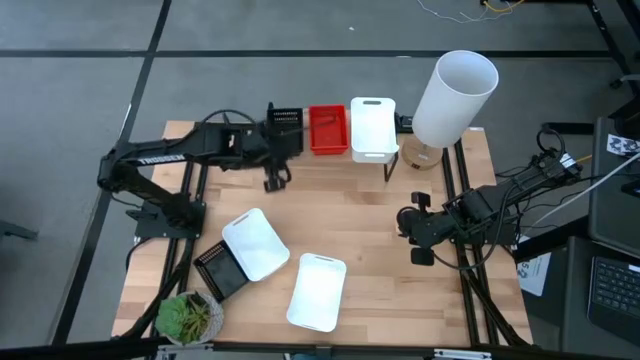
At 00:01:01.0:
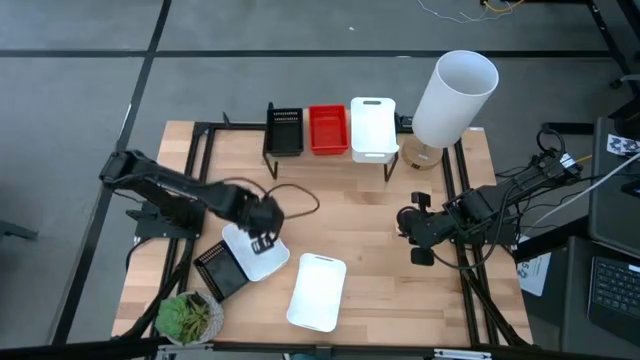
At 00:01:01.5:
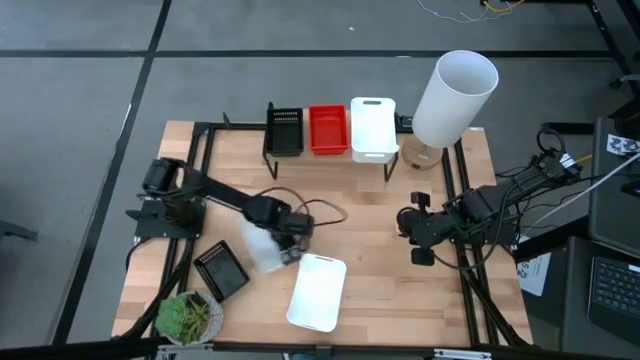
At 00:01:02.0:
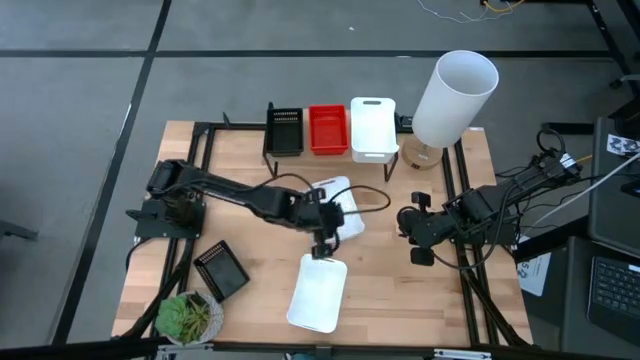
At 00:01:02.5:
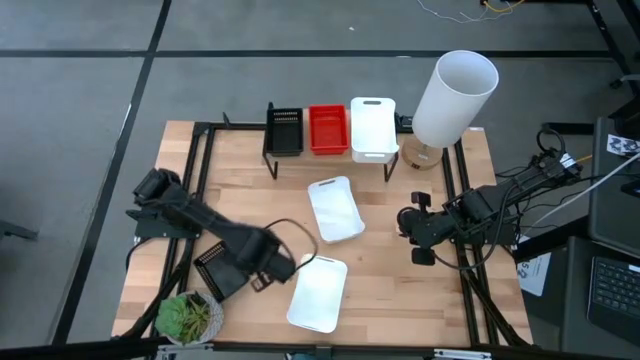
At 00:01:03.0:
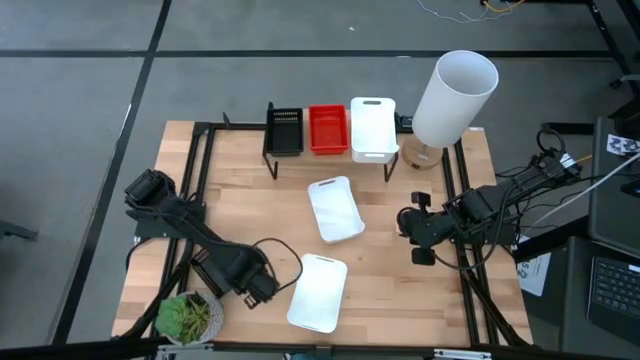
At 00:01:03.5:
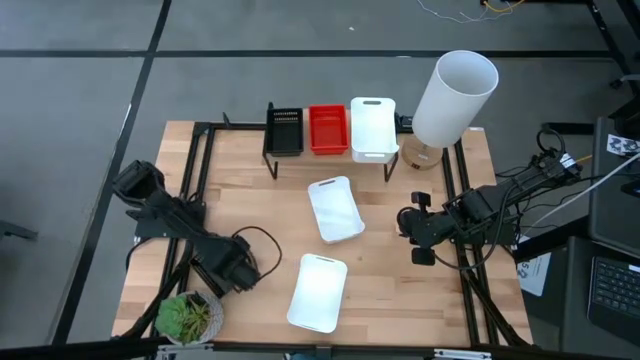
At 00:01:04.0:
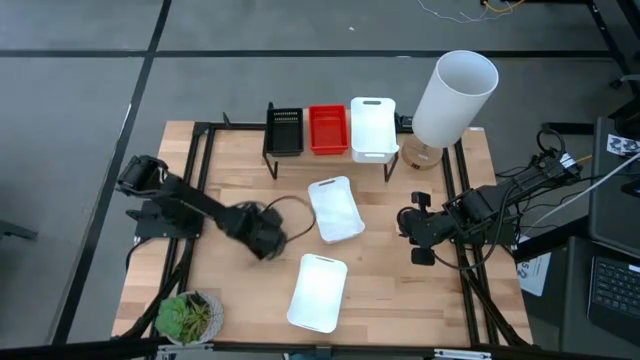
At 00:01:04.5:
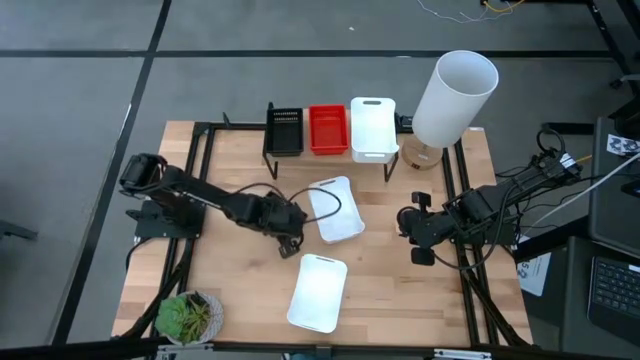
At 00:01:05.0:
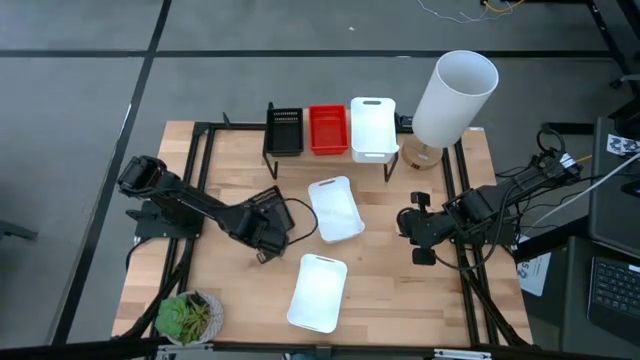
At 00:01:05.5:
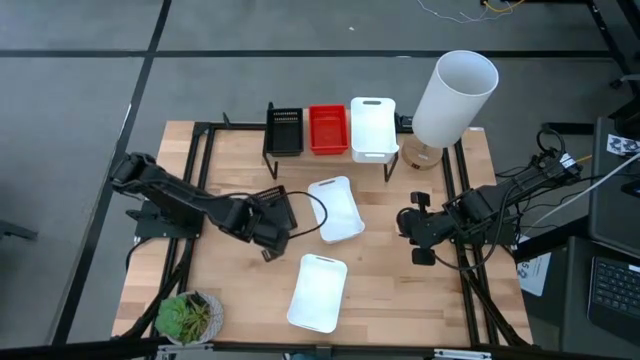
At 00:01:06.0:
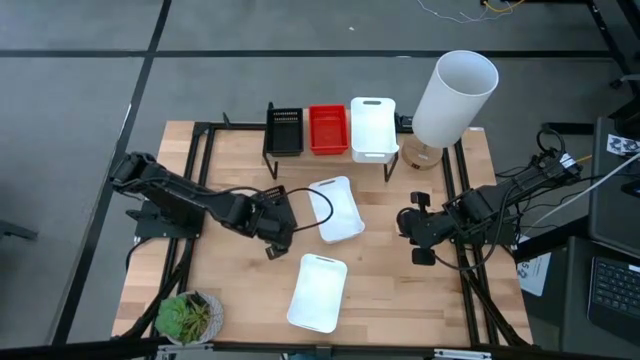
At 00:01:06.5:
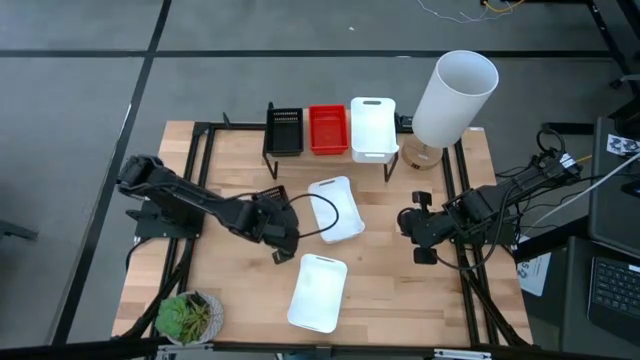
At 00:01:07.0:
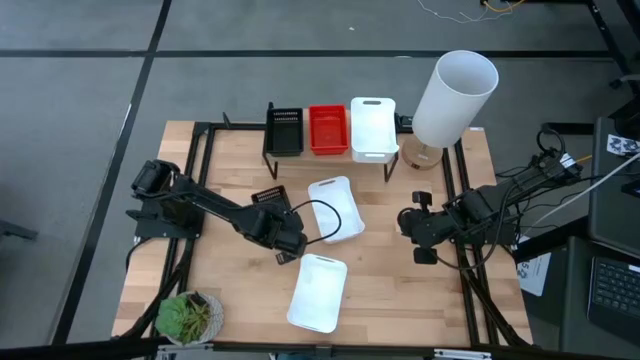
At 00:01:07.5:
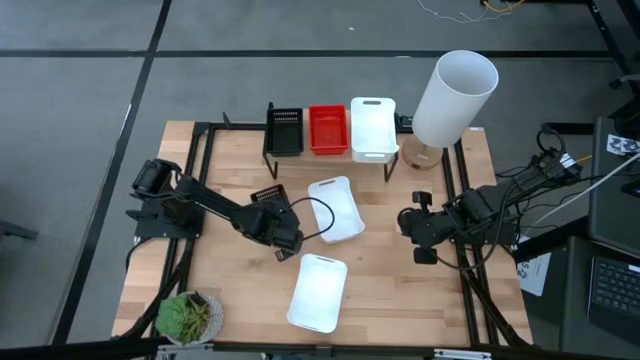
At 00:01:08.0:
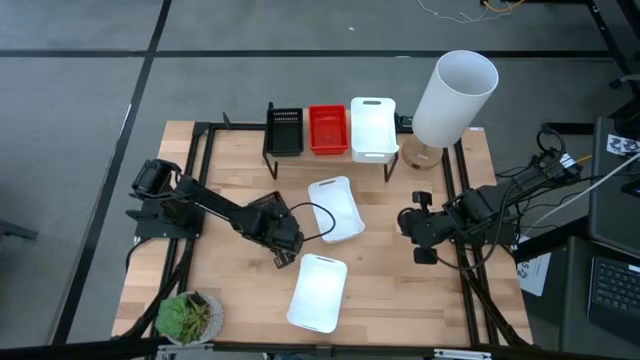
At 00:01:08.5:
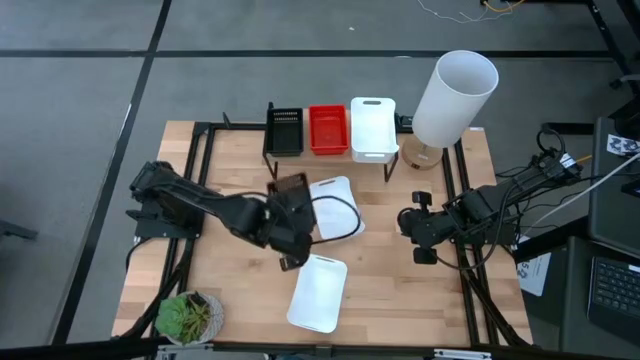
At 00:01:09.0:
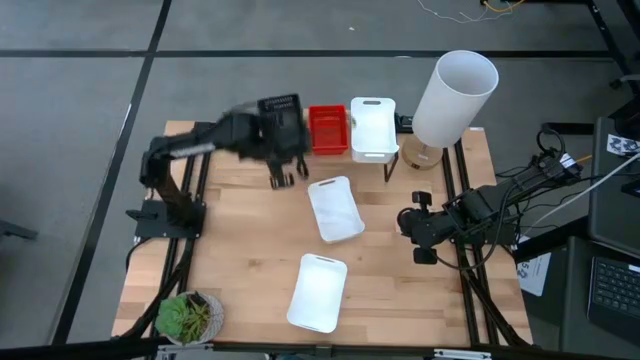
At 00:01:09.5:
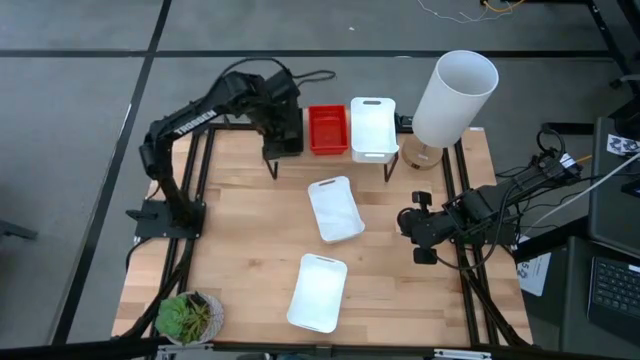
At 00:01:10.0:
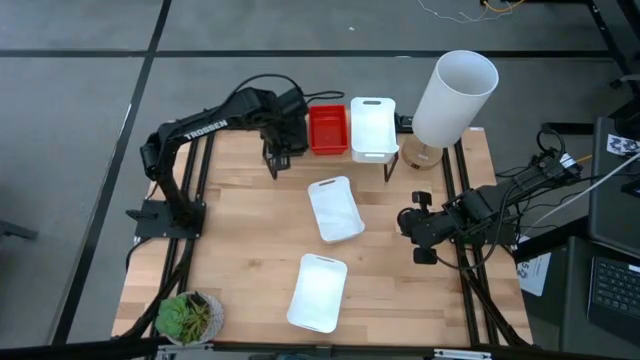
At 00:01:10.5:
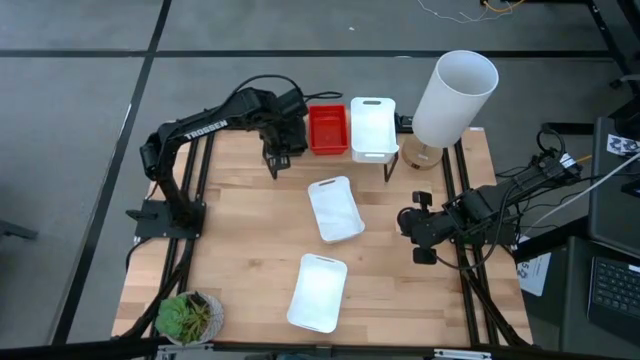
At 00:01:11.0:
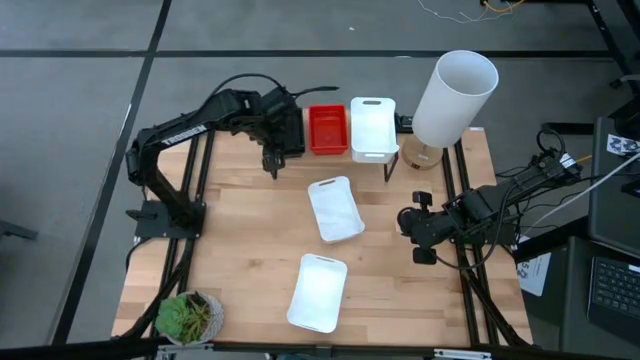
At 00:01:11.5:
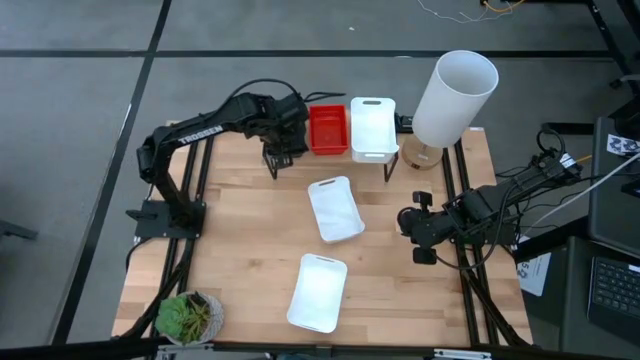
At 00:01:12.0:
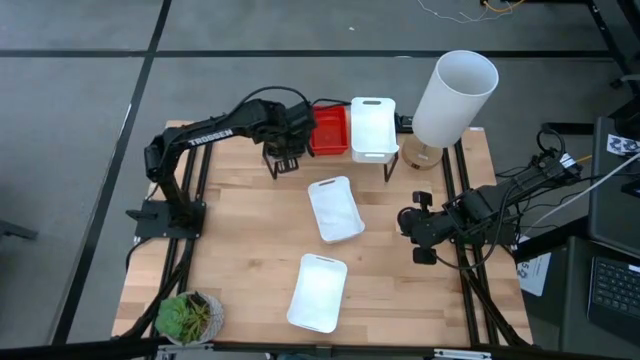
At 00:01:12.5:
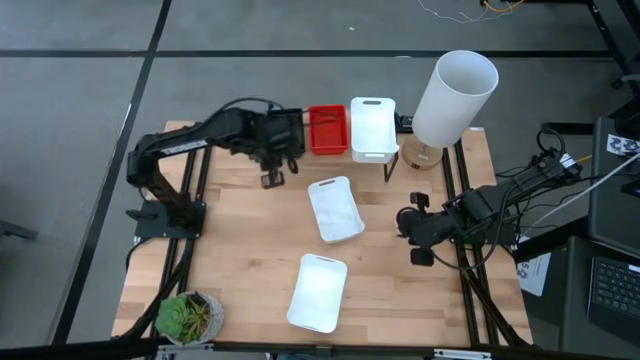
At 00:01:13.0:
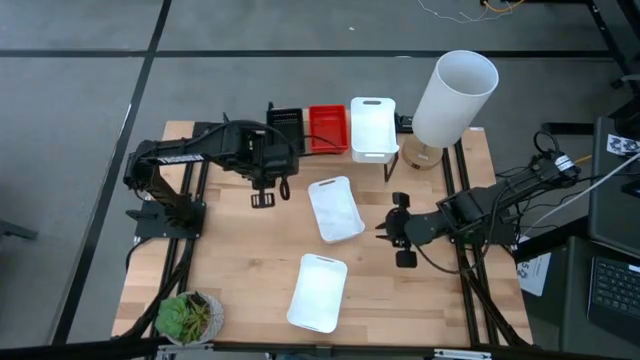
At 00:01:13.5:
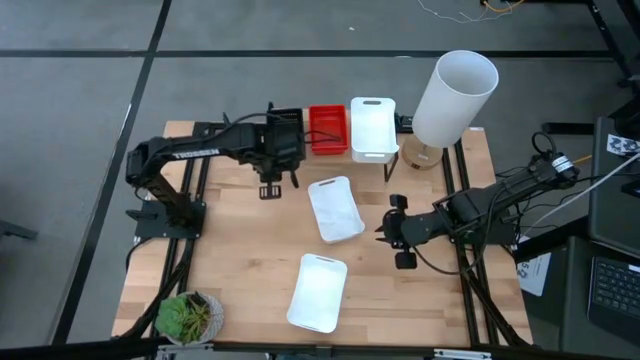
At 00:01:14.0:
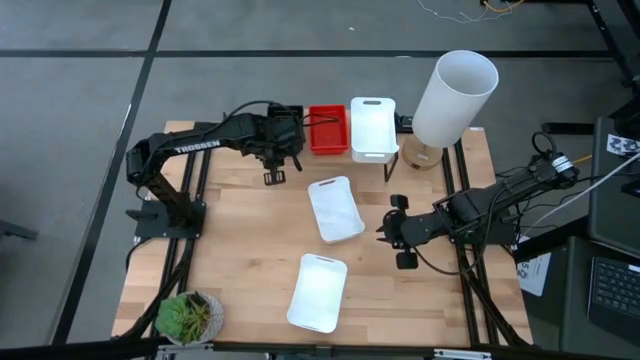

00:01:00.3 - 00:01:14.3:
Task: Stack baskets on shelf by color
Stack the black bin on top of the other black bin on the shelf

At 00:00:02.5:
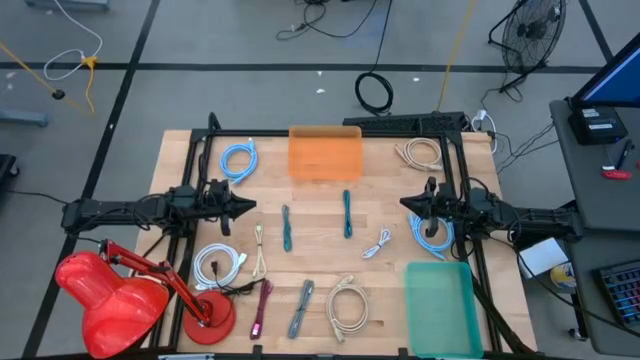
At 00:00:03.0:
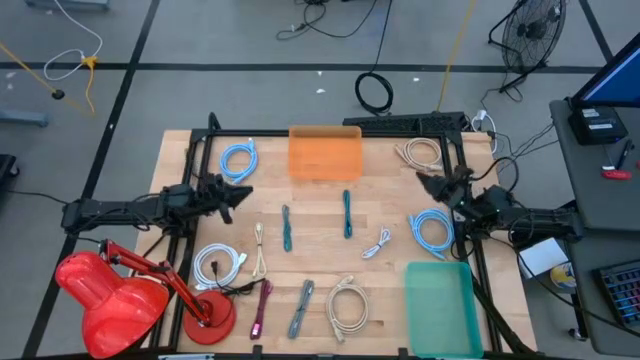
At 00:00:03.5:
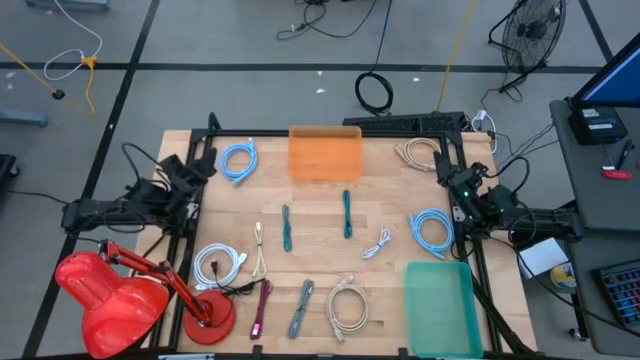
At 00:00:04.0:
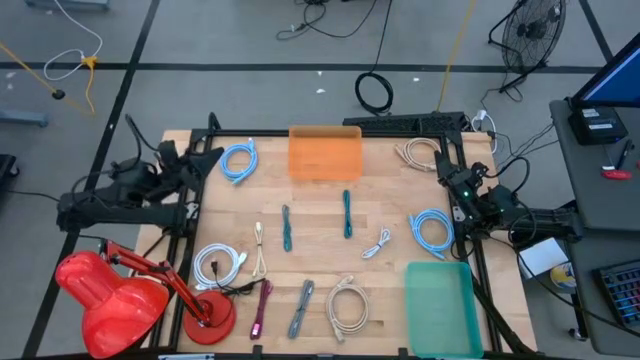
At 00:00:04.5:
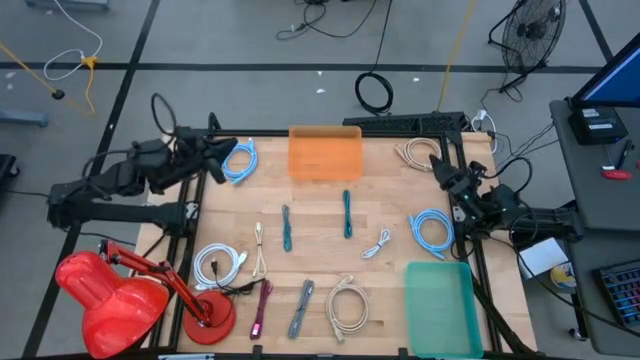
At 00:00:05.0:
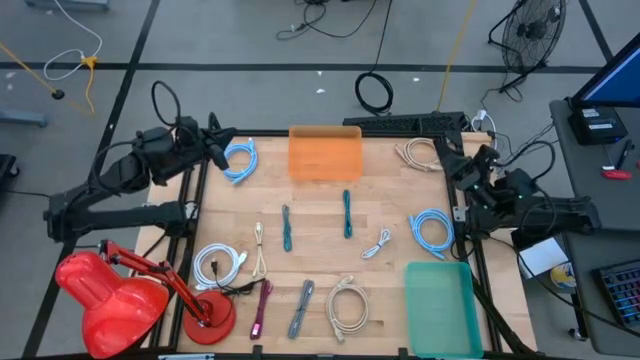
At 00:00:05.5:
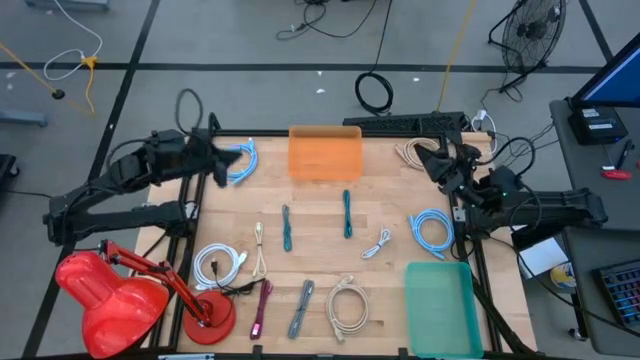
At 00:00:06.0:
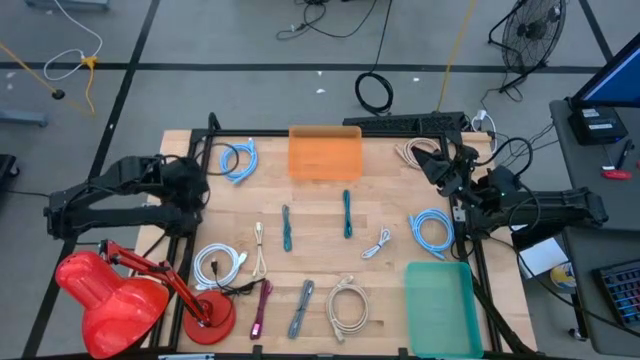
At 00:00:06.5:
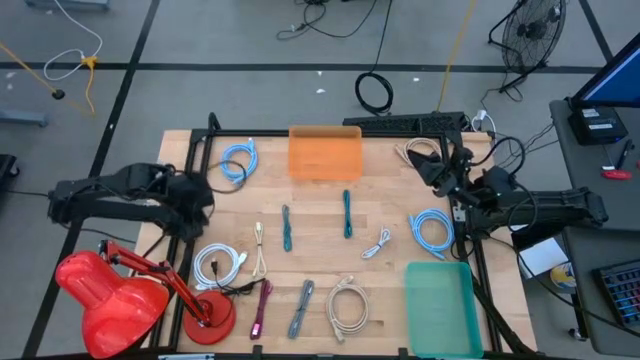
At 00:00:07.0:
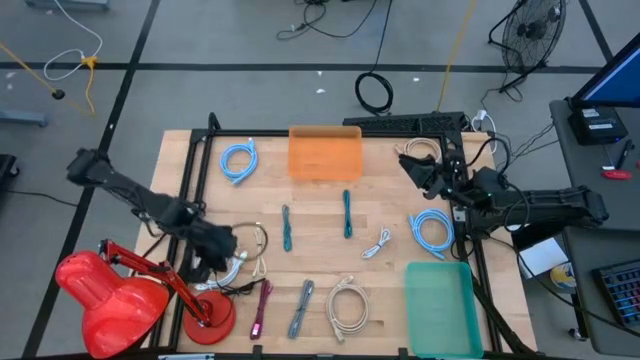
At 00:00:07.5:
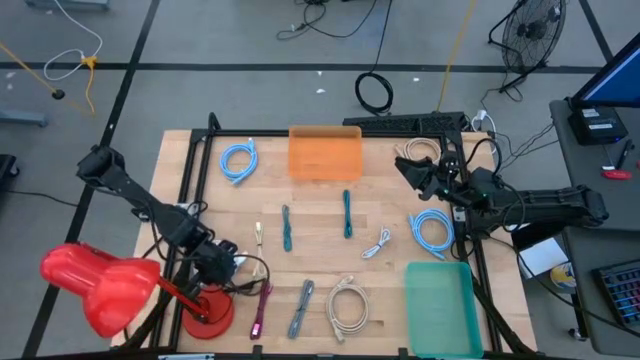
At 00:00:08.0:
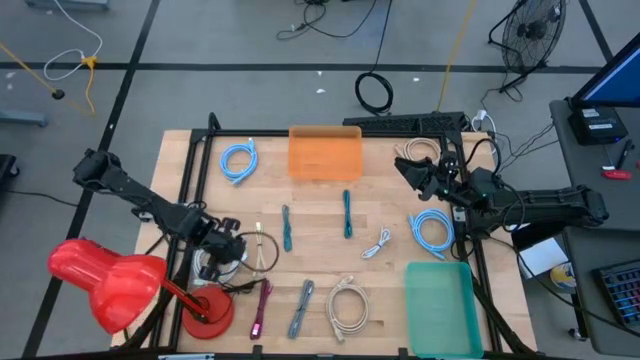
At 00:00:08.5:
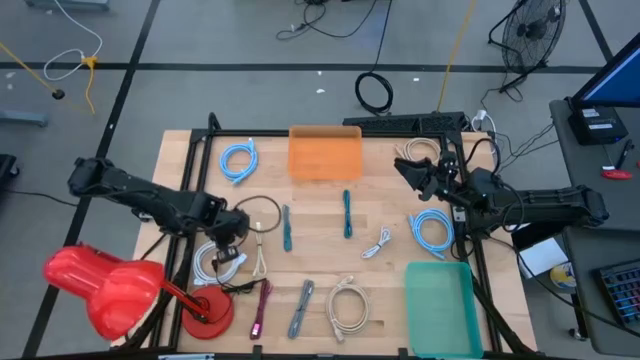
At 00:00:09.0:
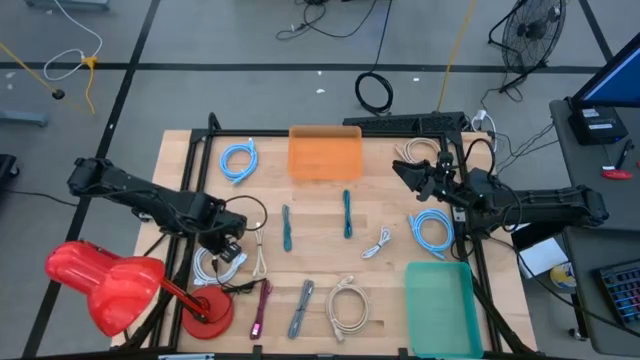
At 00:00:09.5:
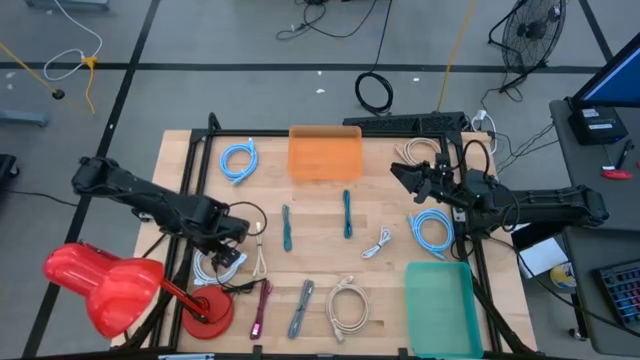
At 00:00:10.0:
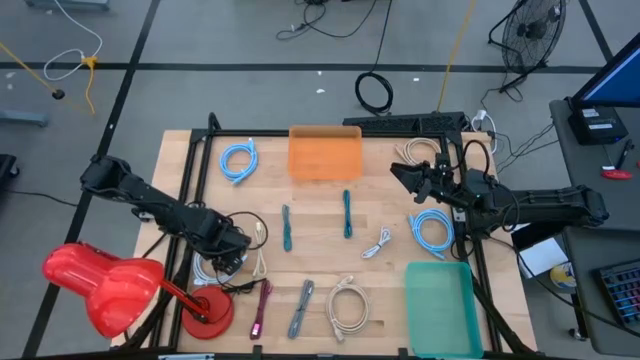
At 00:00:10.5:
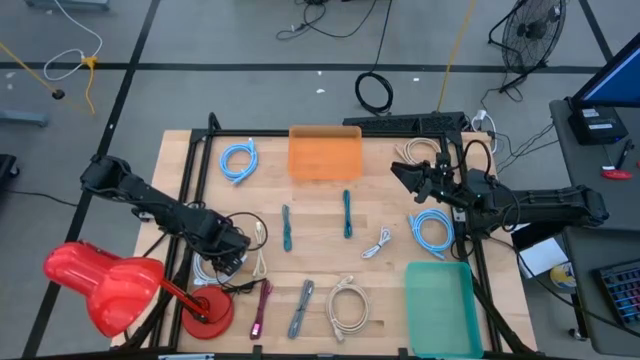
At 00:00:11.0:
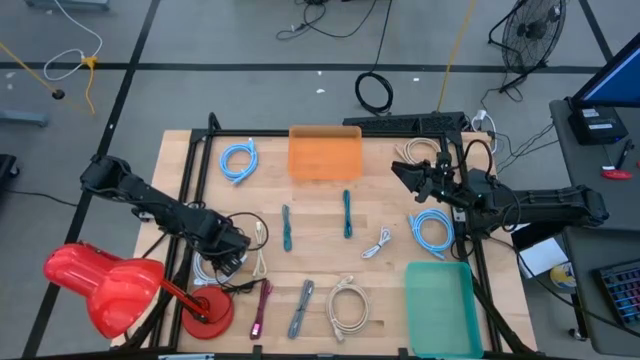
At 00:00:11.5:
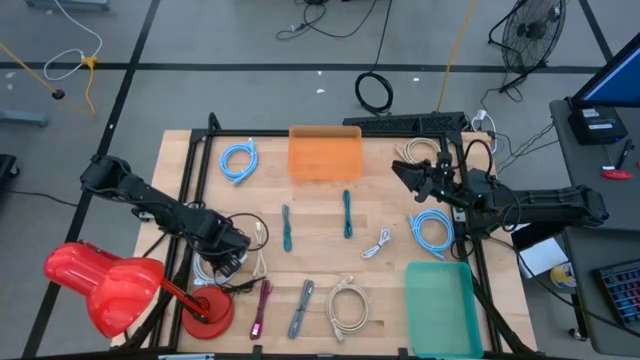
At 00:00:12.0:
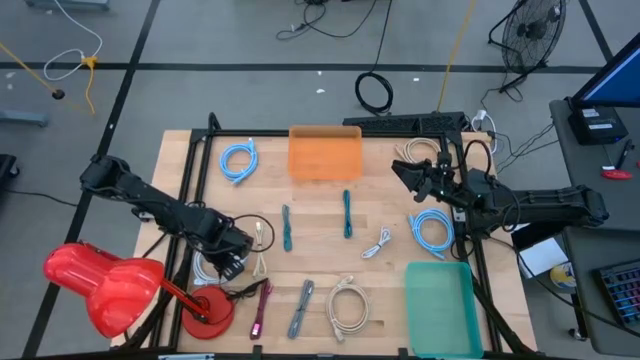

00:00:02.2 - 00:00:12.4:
Task: Pick & Place USB Port
Adjust the black desk lamp wire
